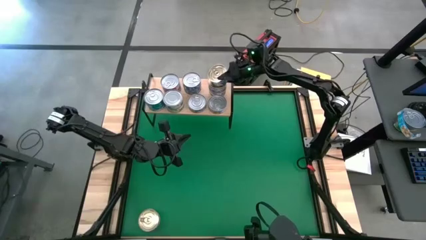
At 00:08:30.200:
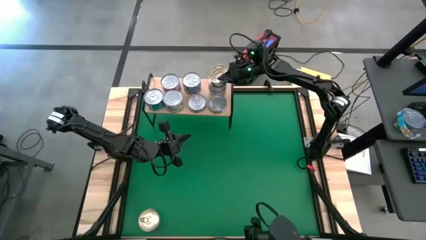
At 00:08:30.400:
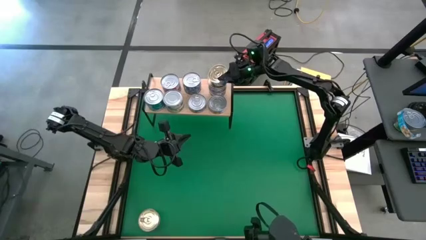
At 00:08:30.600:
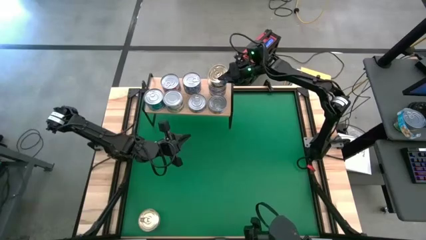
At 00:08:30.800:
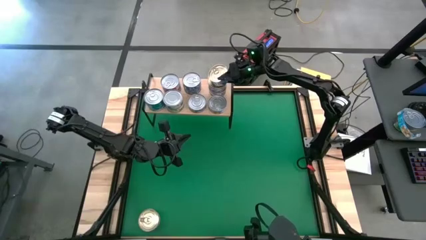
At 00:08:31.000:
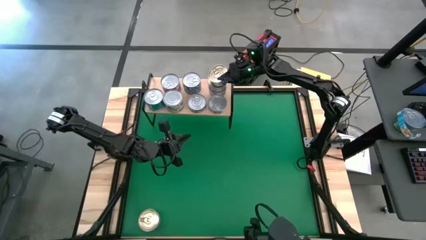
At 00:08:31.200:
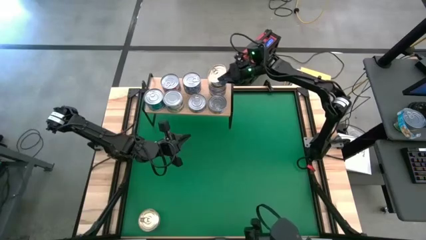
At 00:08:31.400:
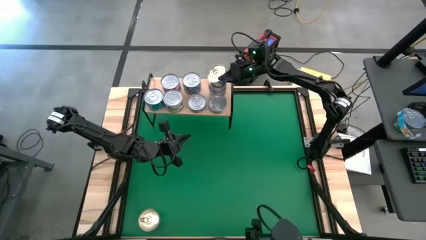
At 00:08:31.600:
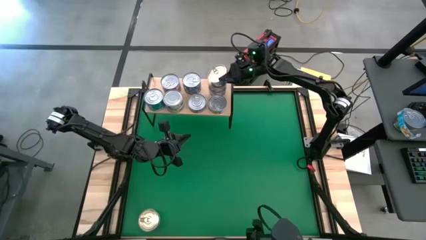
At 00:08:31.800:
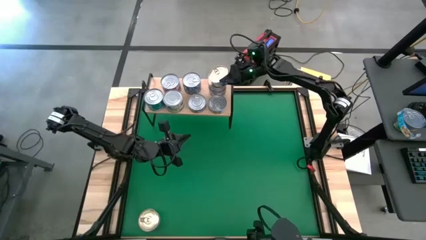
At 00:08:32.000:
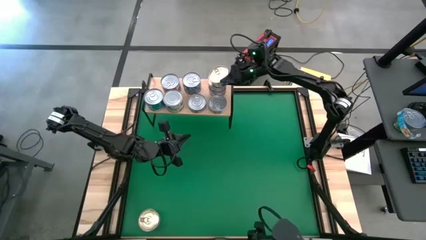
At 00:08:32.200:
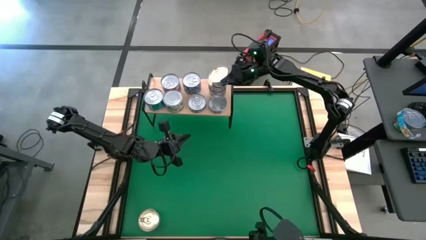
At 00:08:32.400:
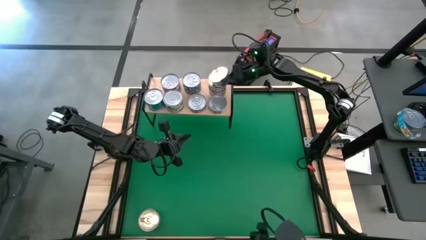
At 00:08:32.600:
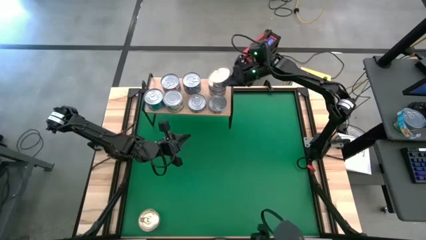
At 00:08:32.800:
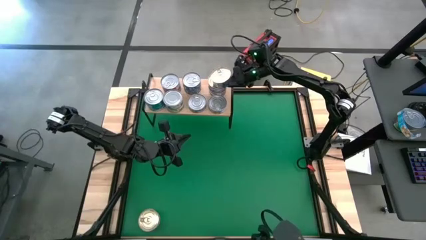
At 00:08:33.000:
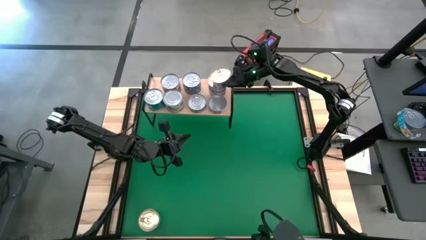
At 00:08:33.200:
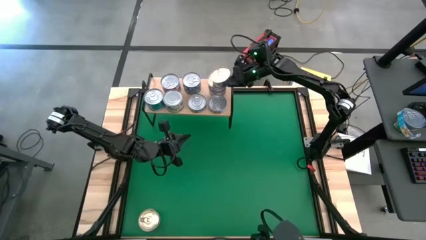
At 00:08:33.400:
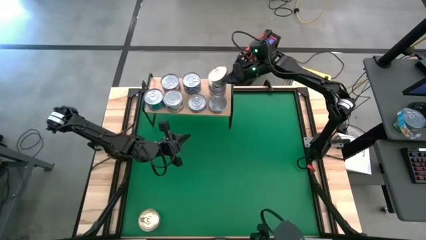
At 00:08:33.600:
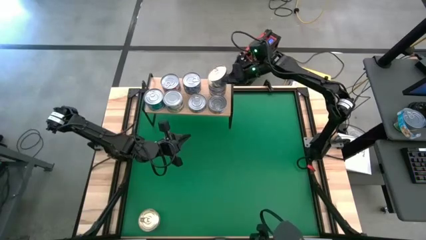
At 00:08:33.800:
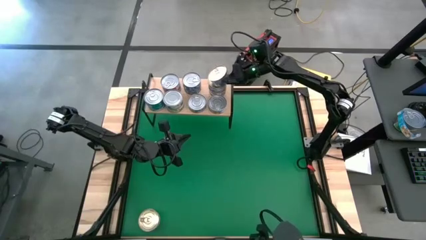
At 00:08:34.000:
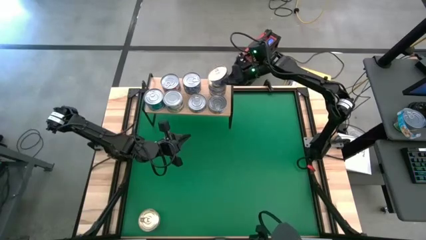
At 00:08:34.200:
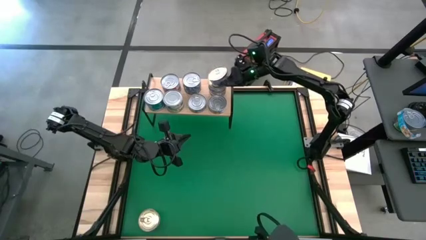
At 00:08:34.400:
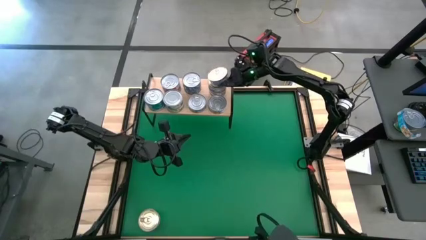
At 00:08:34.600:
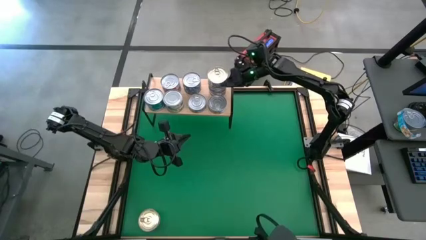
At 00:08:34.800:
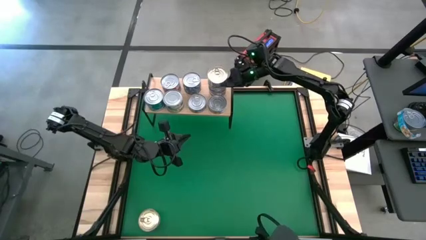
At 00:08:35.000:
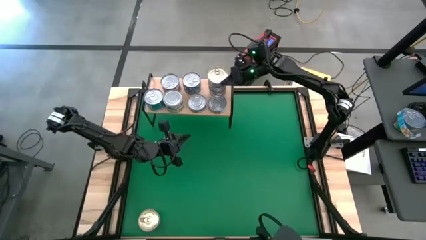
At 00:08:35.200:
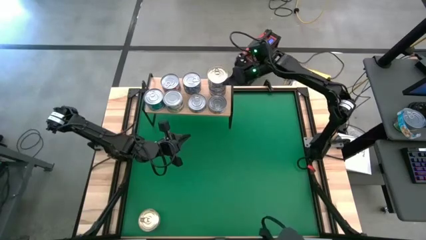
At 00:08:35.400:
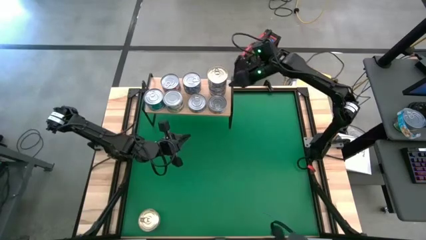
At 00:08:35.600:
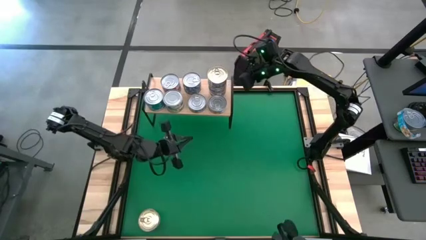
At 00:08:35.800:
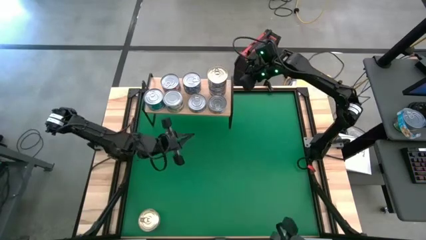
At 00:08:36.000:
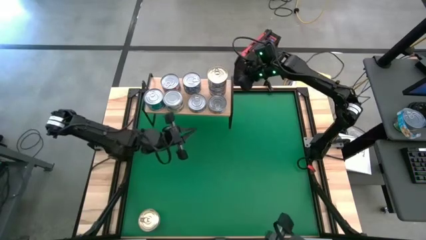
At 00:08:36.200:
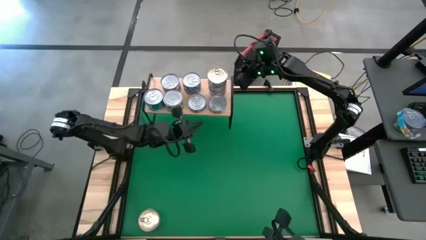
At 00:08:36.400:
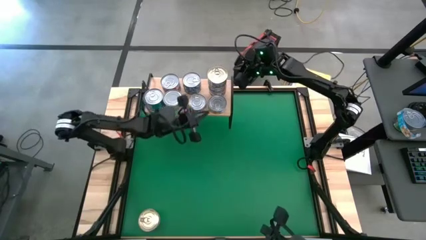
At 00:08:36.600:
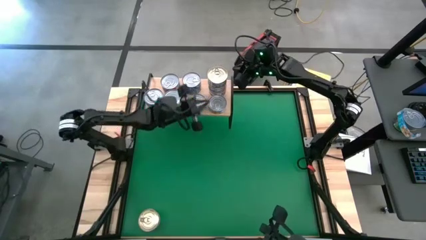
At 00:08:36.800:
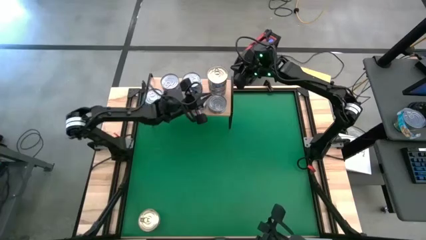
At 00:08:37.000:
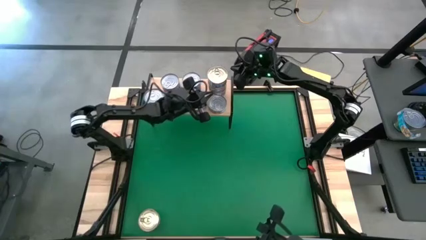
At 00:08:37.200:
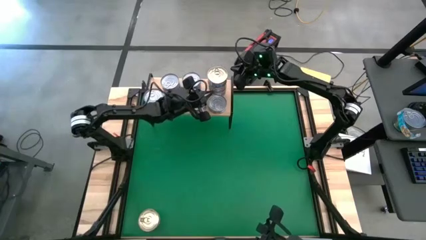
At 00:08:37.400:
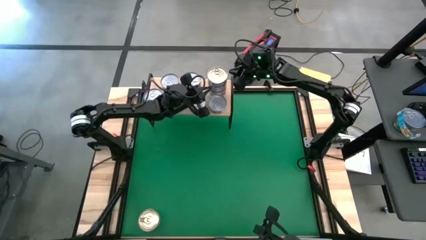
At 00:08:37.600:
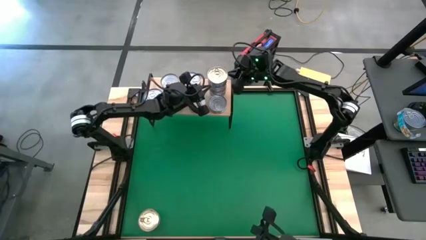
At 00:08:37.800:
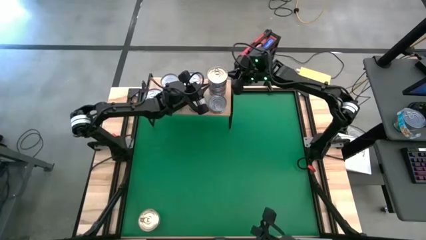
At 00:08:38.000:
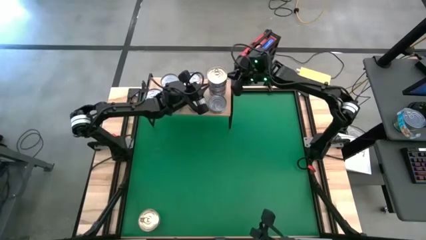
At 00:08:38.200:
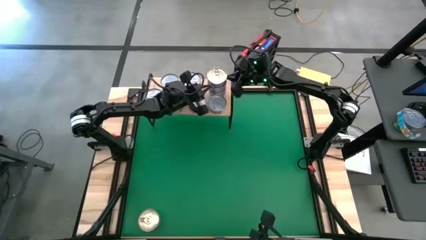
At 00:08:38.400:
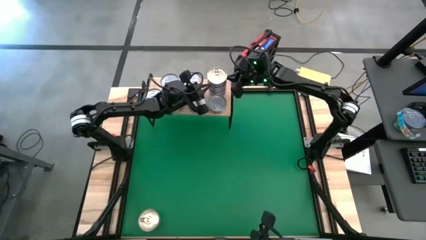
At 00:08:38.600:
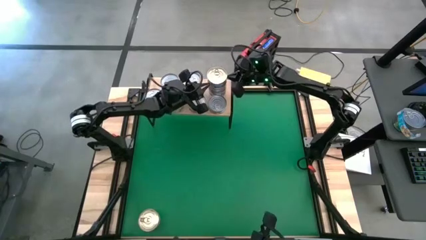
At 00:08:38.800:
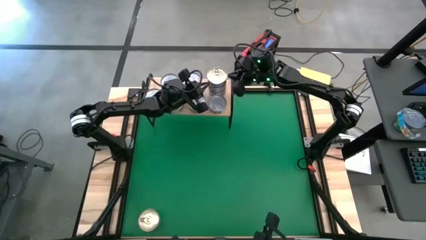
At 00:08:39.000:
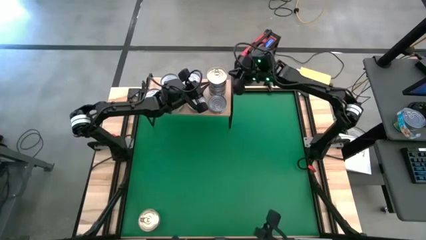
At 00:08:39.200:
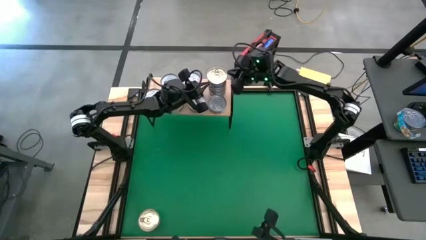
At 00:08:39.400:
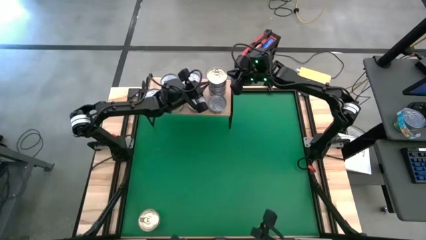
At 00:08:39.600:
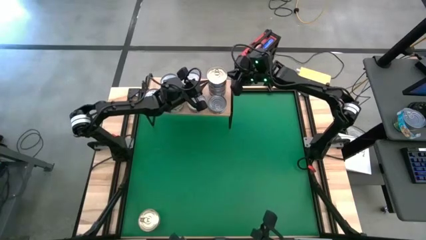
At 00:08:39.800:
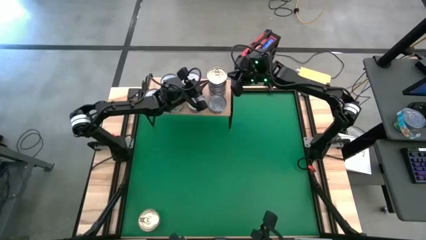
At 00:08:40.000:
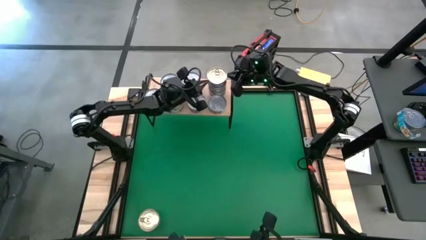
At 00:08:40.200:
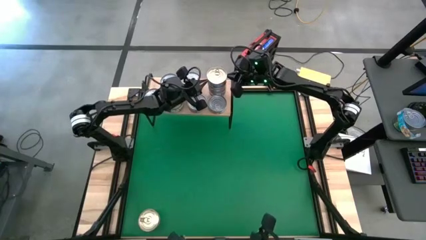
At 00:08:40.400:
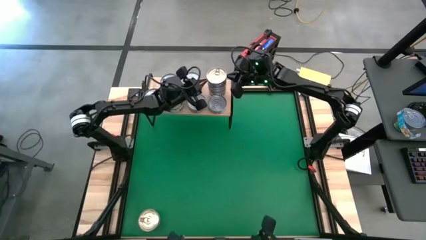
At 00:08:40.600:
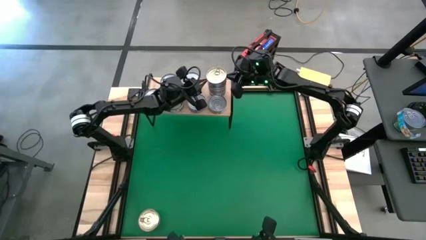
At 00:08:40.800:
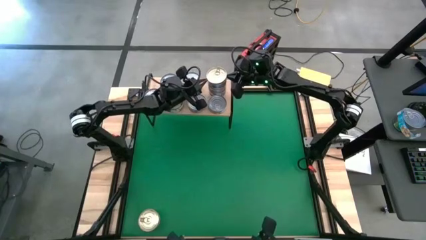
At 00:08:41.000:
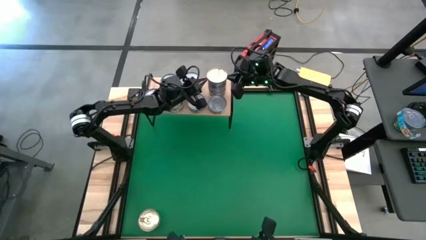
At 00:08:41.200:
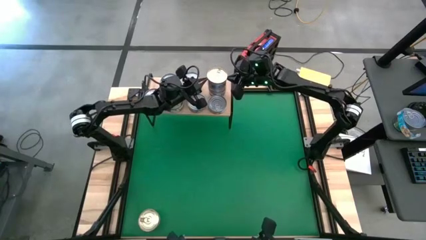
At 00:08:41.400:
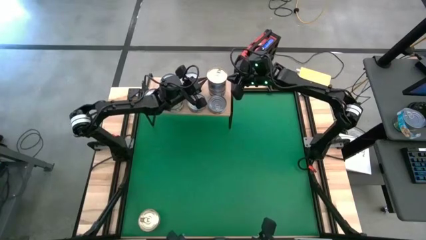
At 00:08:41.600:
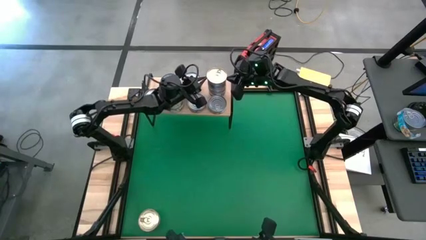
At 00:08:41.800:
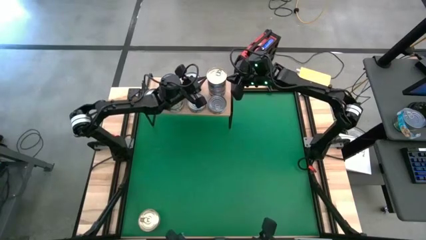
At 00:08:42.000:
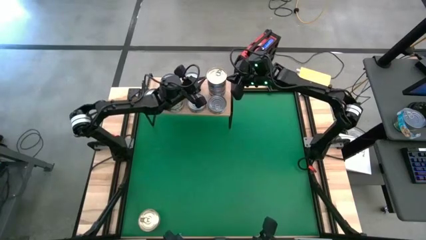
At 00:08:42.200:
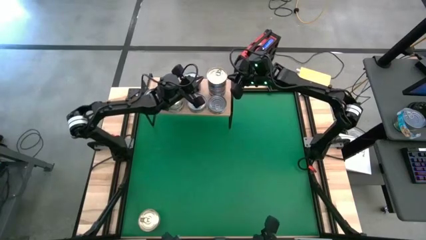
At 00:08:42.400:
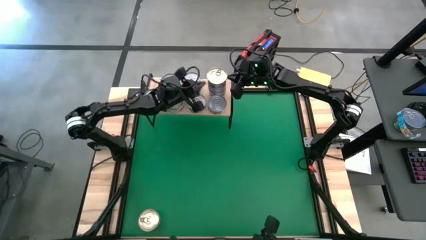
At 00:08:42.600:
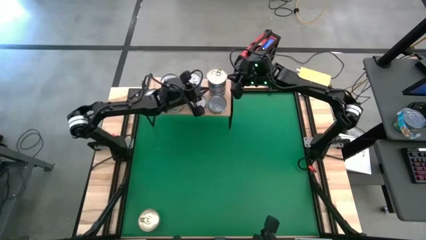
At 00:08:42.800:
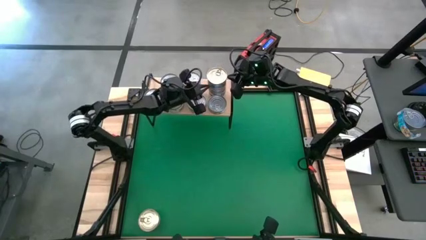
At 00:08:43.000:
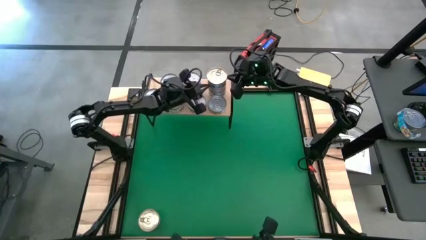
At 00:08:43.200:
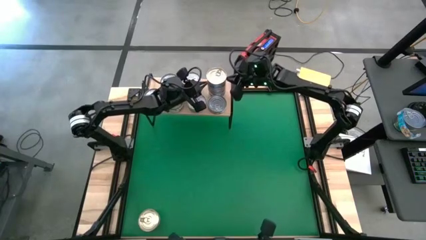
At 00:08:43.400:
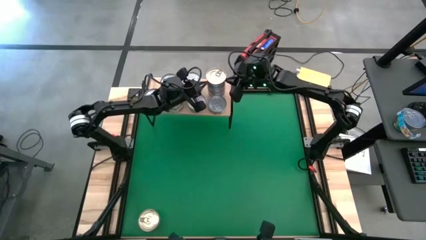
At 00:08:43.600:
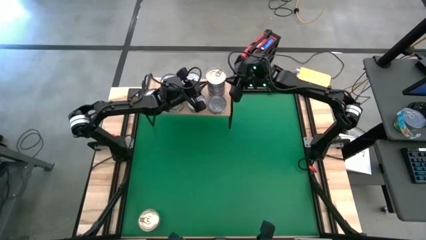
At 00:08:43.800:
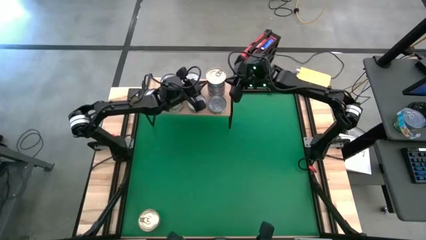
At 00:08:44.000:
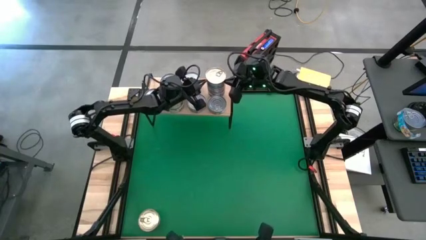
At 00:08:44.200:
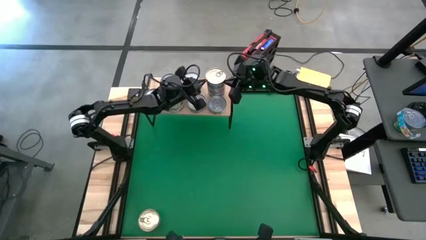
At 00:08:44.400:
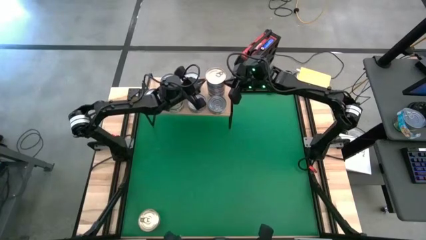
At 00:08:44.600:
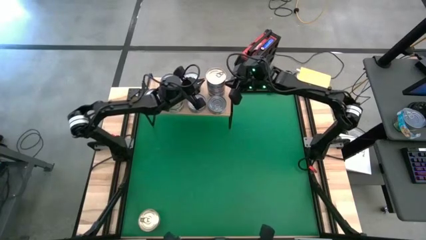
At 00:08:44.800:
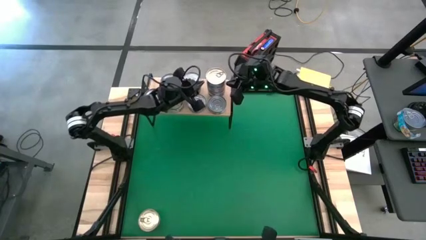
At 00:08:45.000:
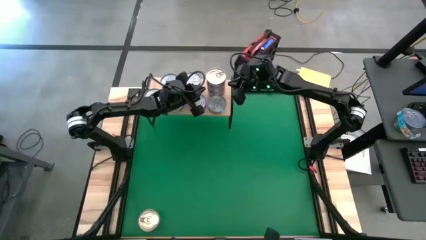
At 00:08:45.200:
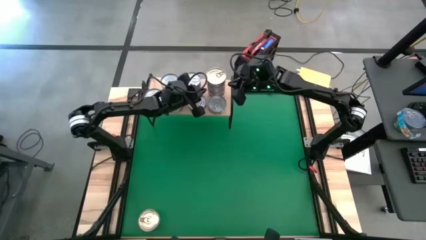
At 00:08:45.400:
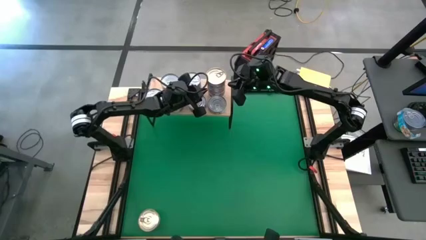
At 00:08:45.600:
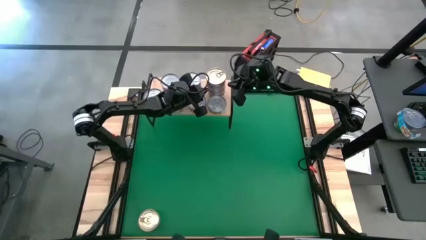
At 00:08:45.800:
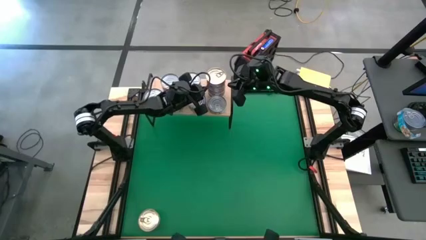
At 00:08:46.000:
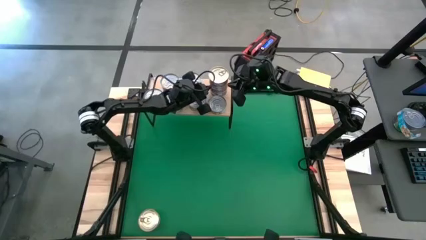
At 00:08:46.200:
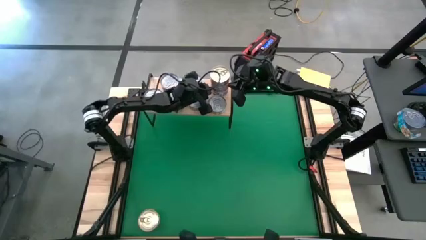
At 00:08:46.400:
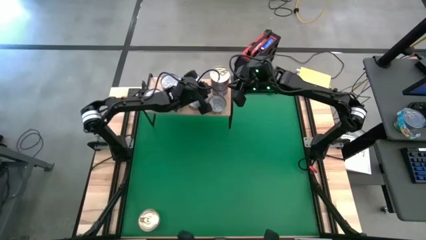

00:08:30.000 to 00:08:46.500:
Task: Stack canned seafood by type on shelf
Stack the center blue tuna can on top of the blue tuna can on the shelf
